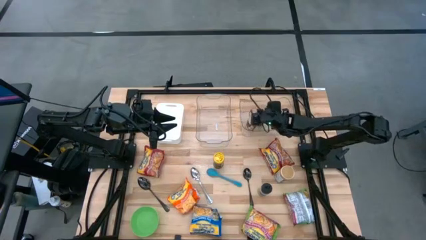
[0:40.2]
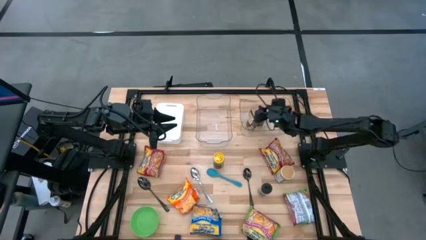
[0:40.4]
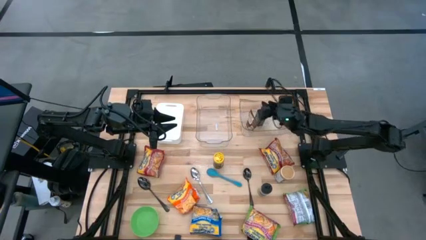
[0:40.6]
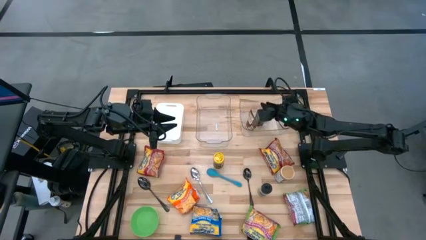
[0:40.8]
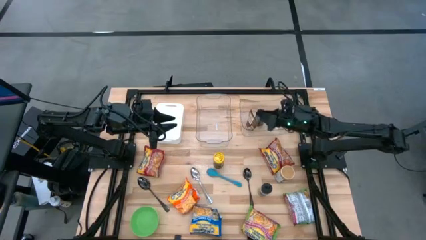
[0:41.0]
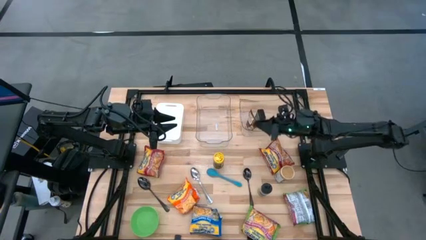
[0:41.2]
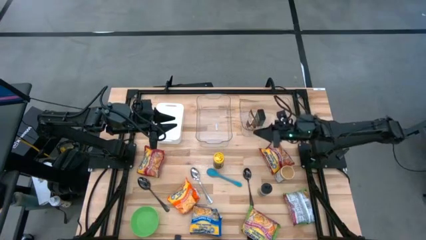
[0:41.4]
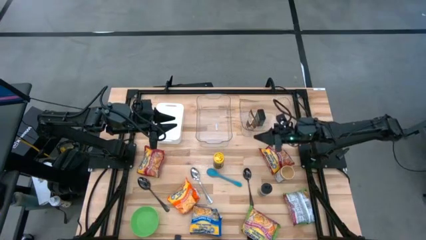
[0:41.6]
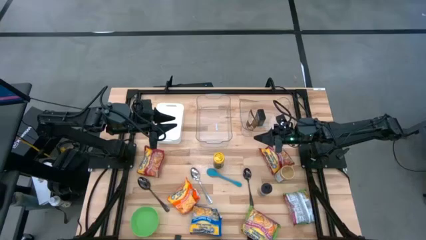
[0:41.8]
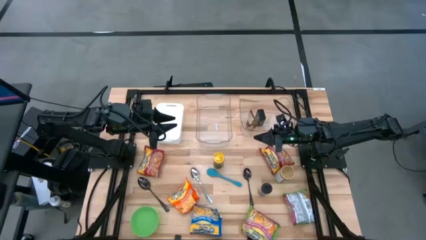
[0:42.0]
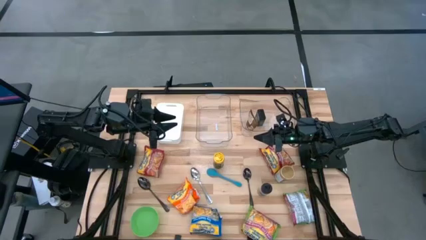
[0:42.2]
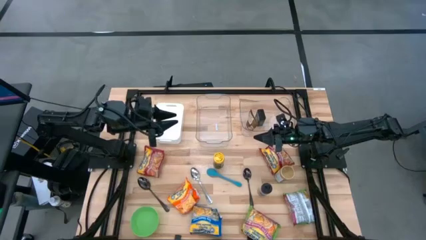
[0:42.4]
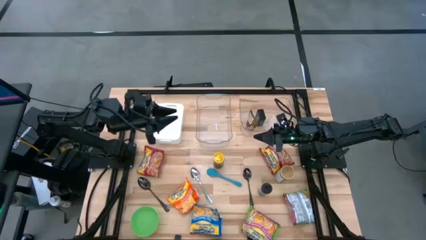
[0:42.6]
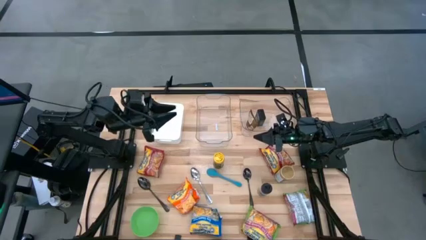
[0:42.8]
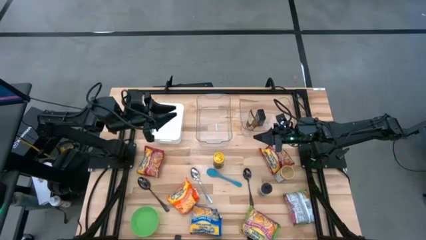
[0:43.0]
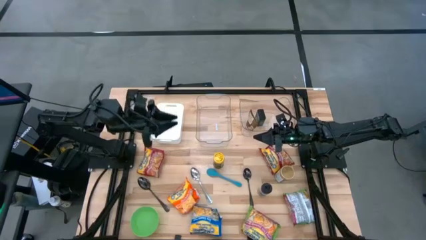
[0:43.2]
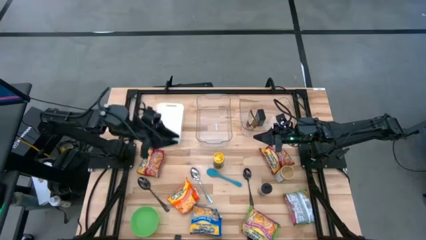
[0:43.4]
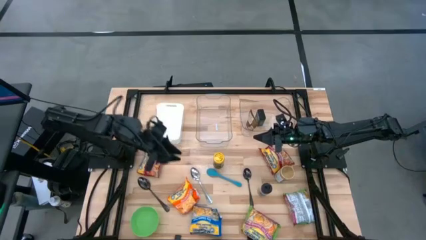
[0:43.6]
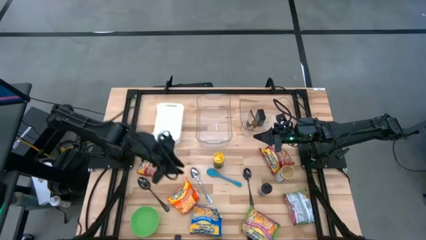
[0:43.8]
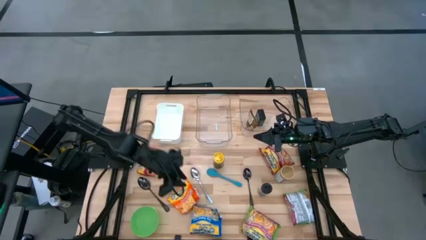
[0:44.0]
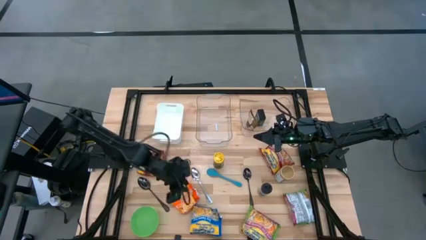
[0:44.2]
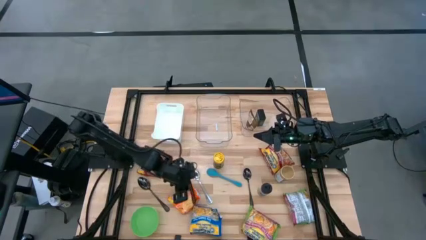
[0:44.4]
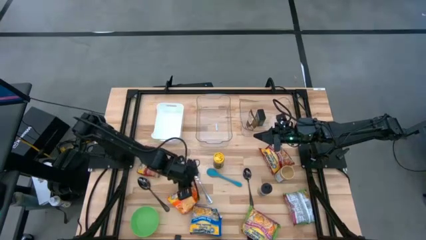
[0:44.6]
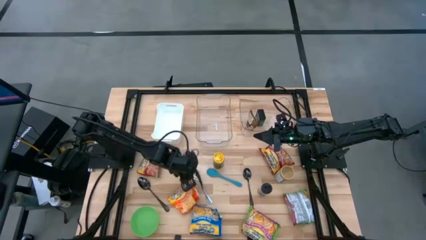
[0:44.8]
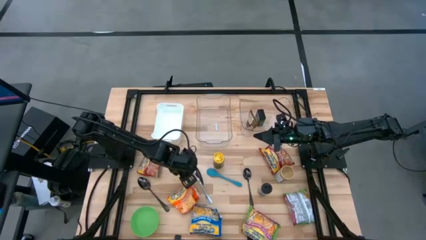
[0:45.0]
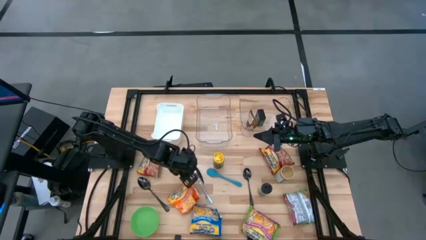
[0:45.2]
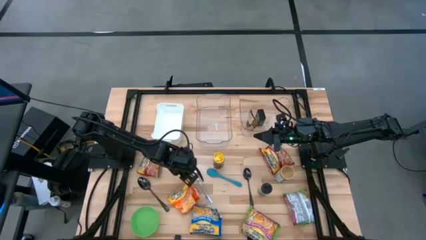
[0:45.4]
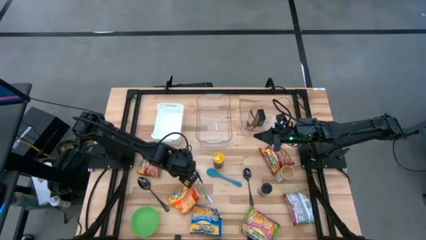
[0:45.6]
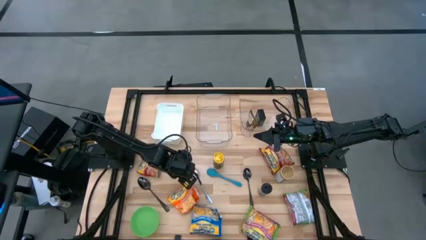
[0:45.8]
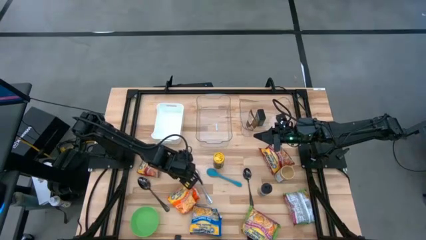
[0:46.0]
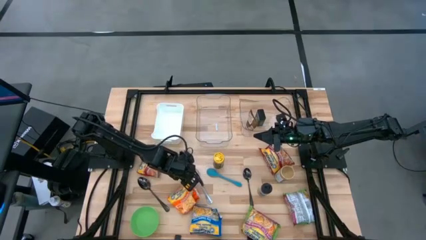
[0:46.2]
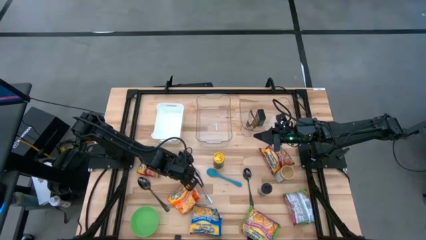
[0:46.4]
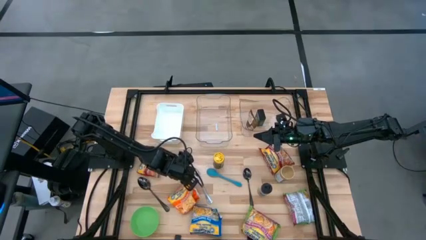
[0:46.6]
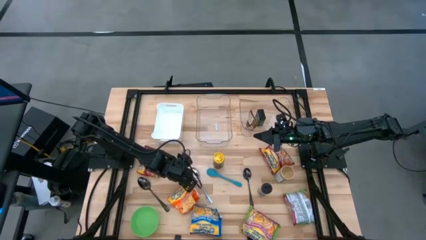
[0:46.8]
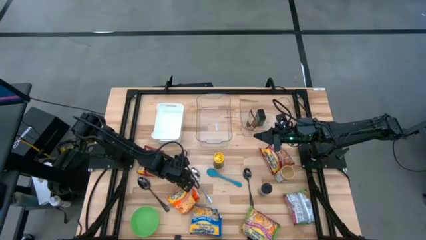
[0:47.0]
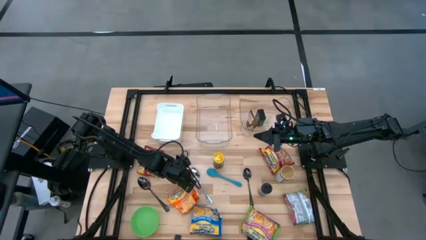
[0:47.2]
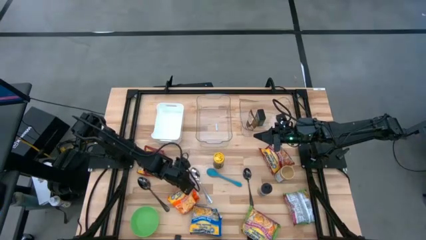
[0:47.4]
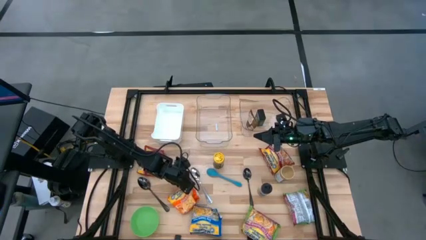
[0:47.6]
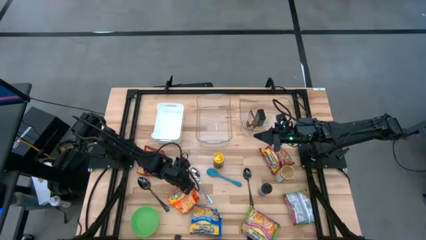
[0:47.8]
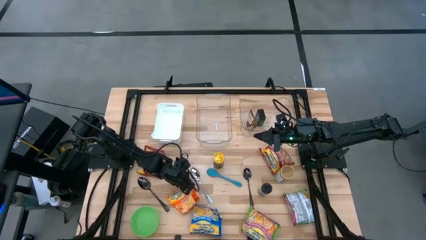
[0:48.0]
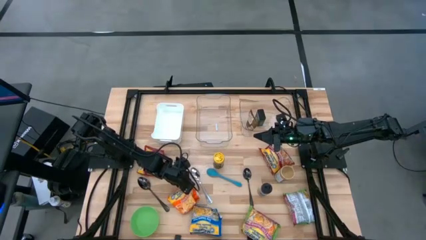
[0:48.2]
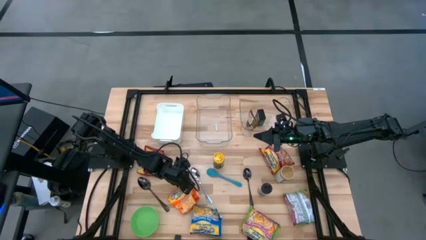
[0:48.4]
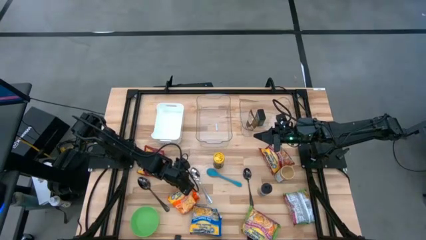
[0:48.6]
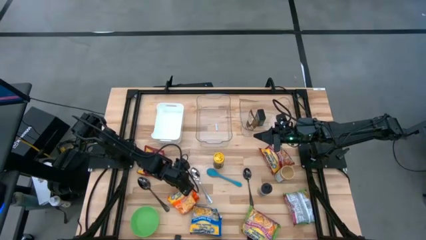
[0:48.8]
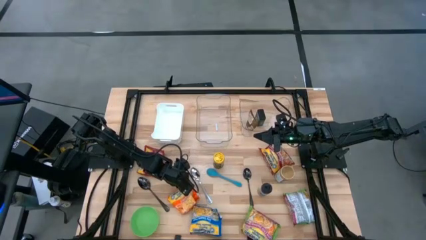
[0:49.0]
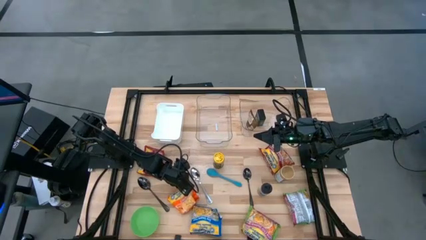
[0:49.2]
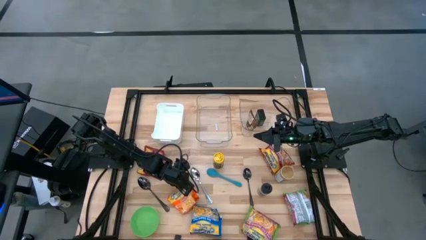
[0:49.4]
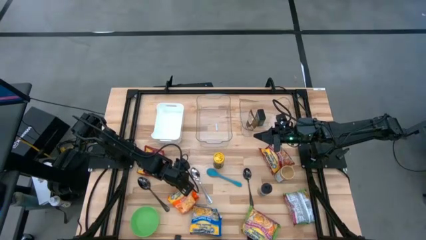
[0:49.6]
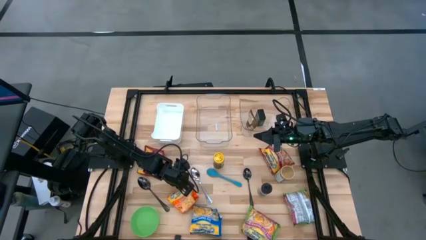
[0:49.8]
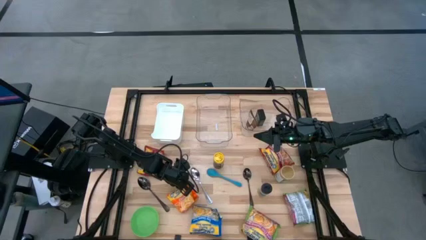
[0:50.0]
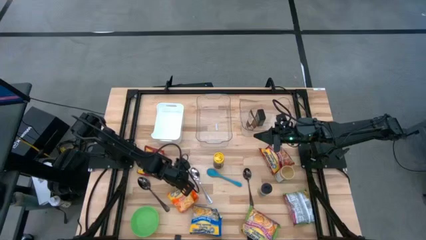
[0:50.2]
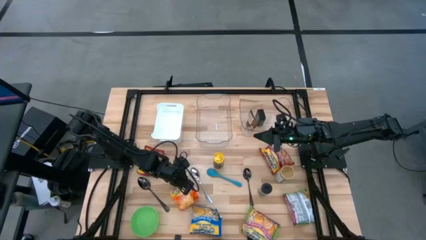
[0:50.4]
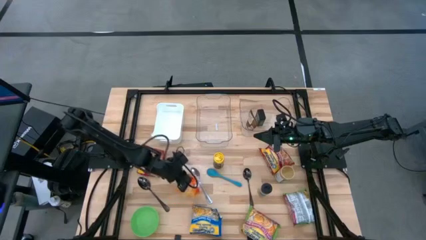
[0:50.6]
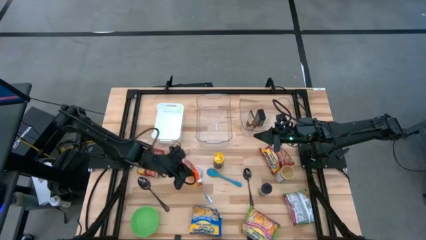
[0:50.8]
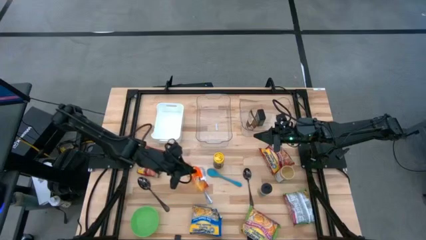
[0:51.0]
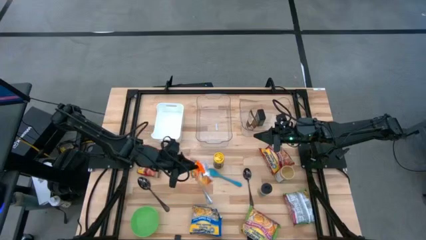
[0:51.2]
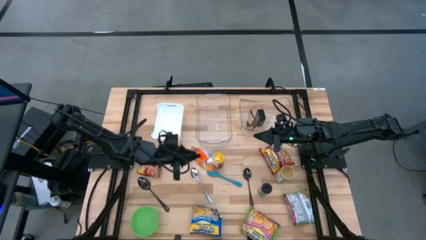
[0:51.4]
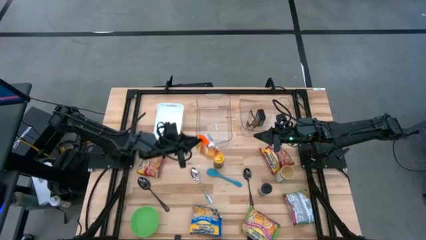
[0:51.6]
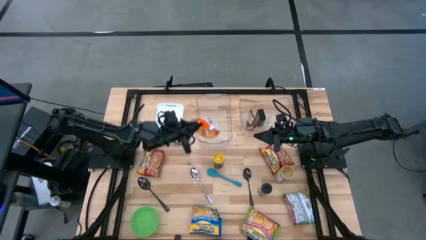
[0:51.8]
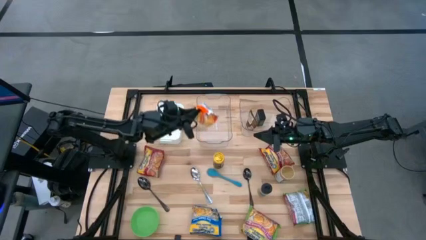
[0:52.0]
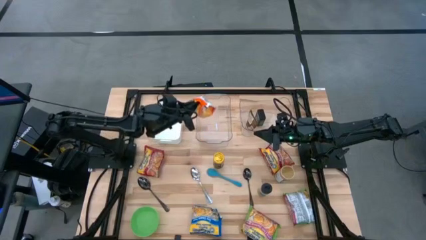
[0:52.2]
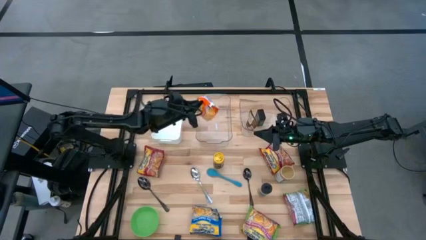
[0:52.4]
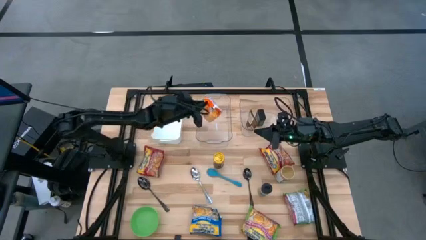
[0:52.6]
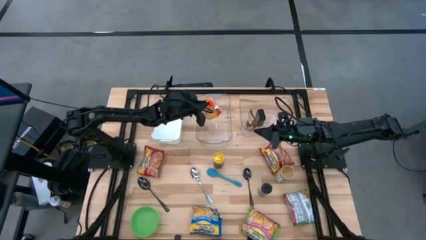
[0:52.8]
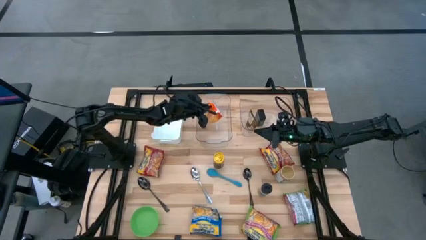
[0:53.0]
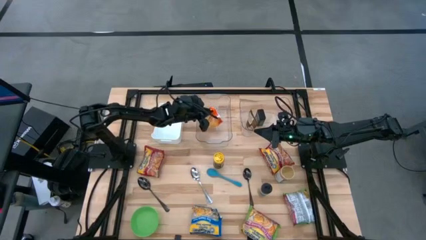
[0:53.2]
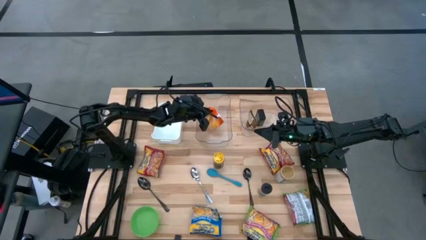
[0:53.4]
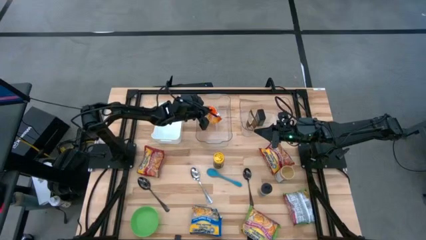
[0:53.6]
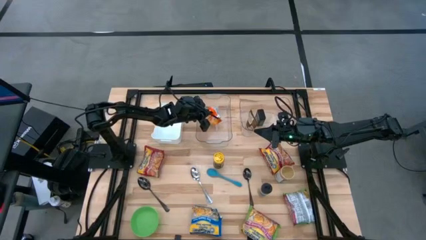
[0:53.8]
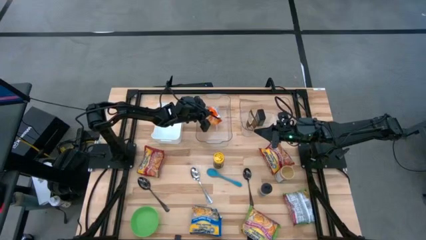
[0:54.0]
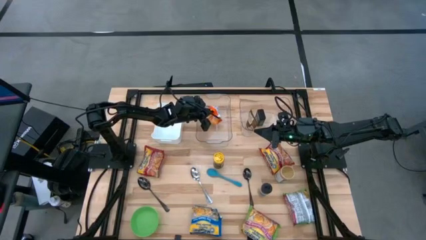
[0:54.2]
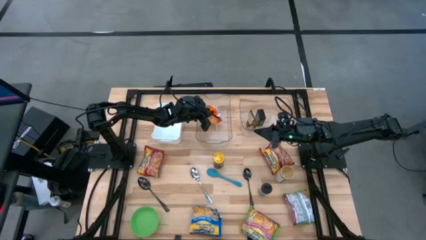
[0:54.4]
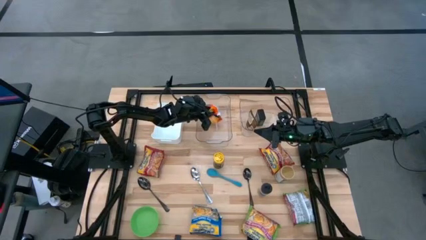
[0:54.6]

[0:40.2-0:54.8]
Task: Pick & Place Food Item
Put the orange noodle pack into the left transparent bin
